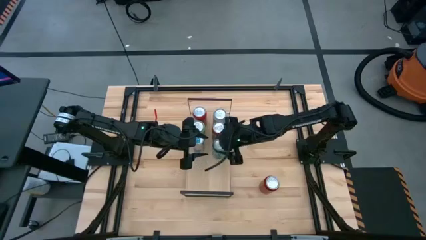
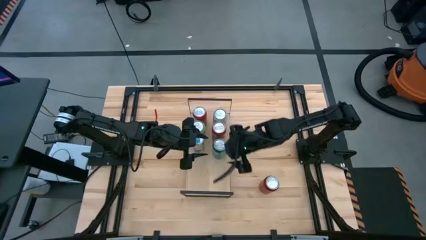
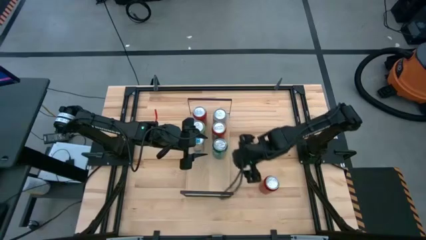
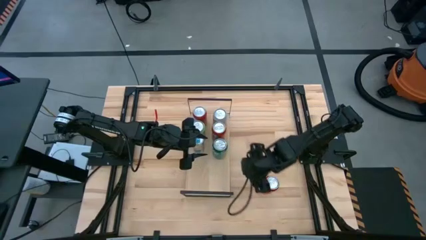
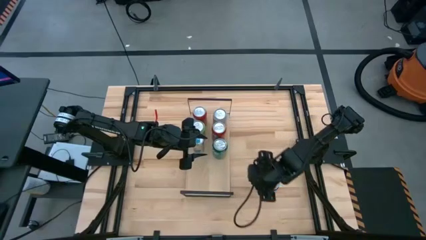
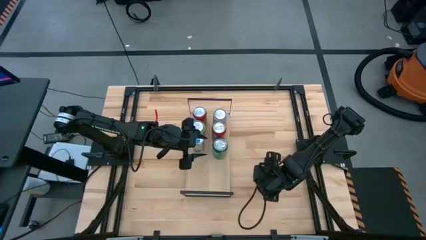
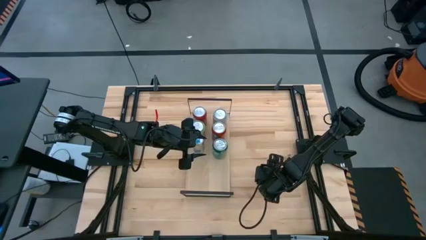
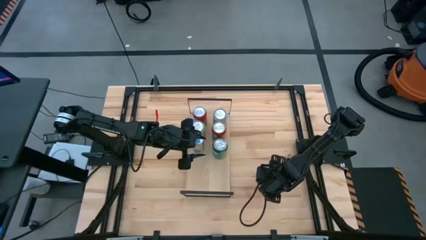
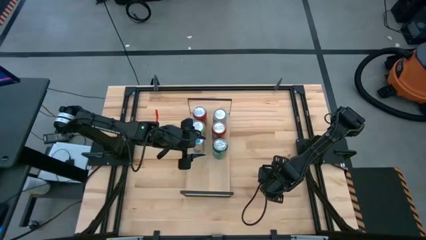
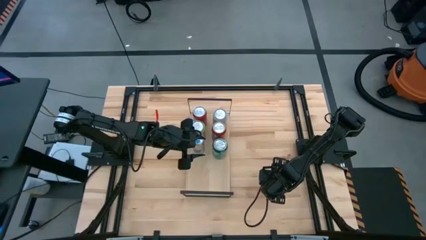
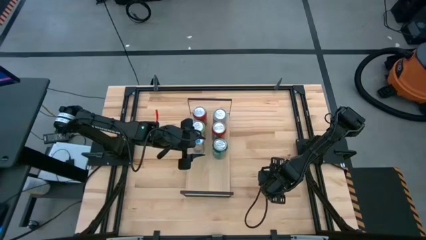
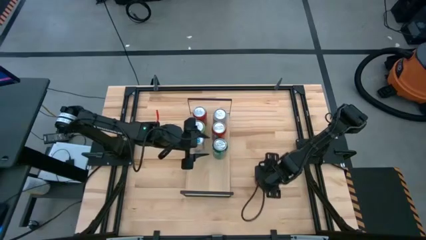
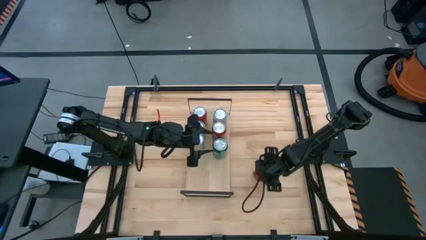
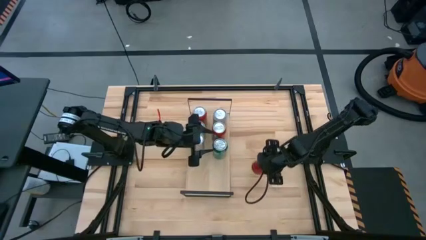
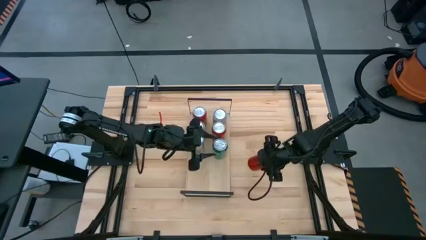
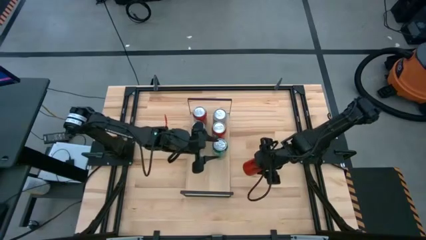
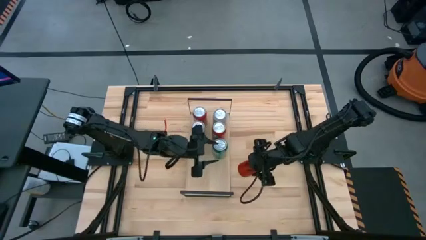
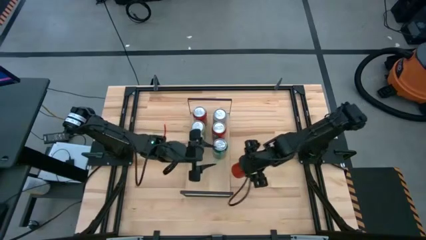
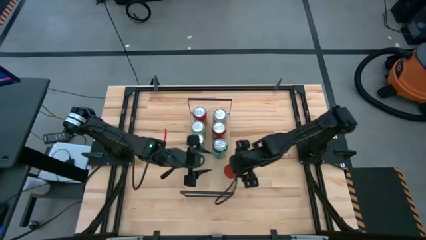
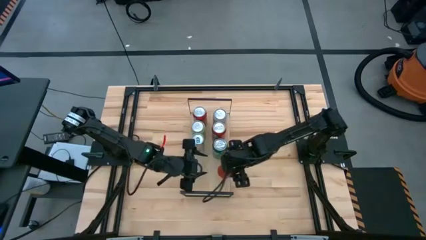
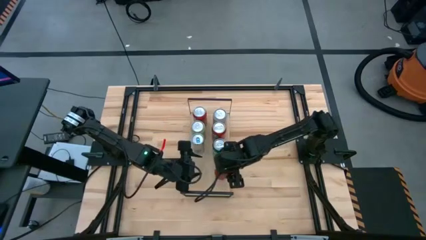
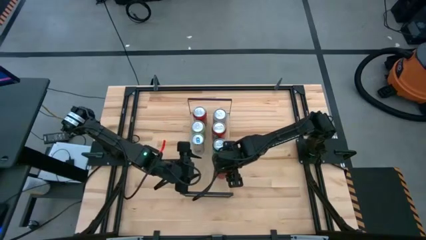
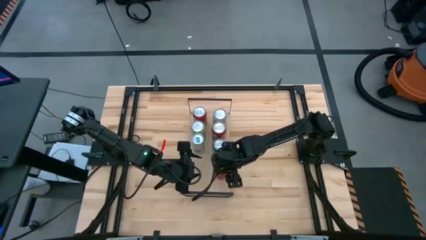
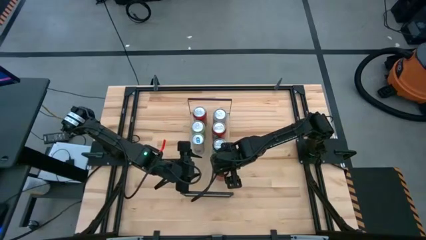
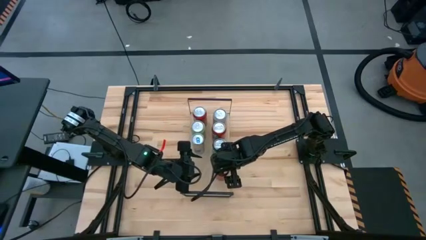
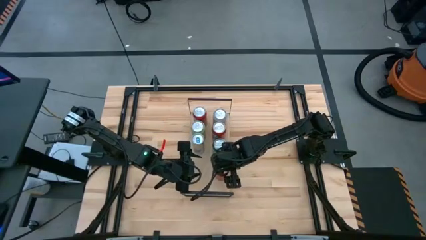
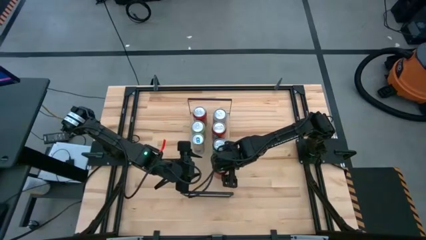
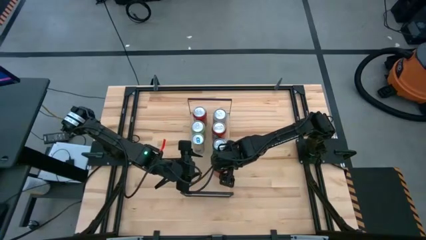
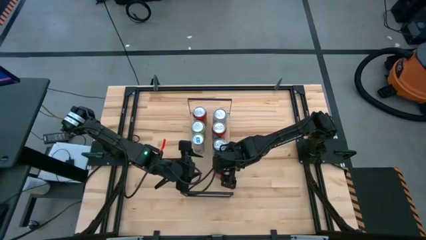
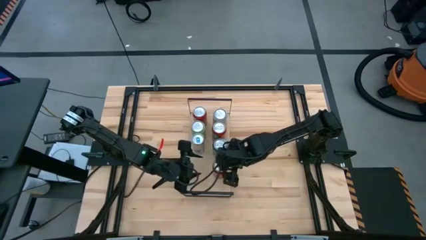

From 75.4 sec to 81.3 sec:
Task: Place canned beverage on shelf
Put the red black soda can on the shelf

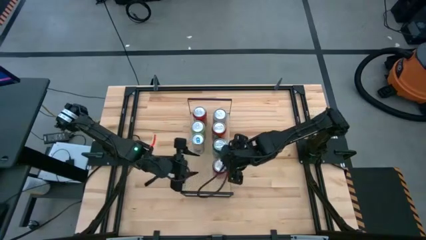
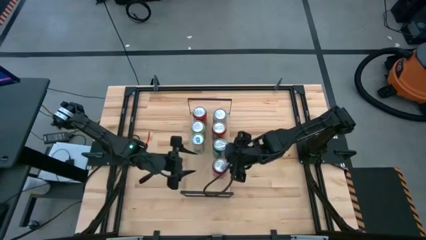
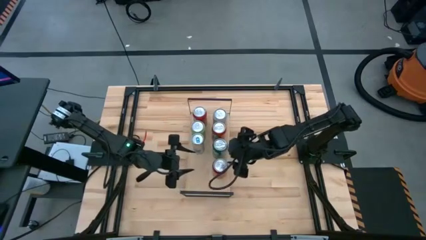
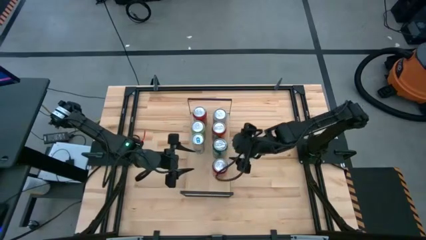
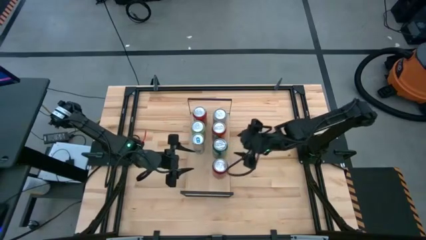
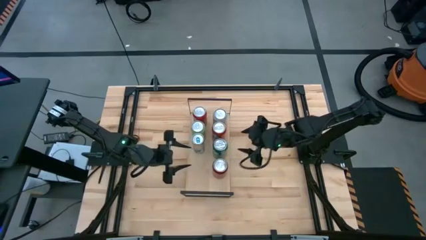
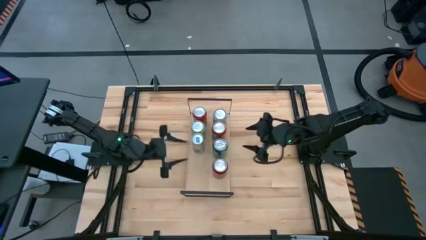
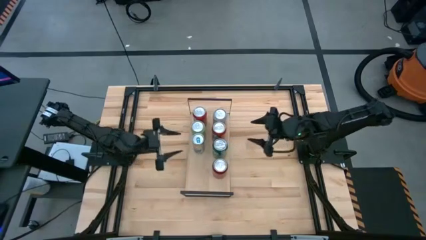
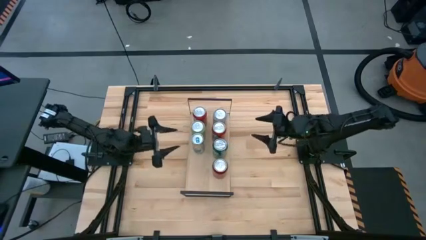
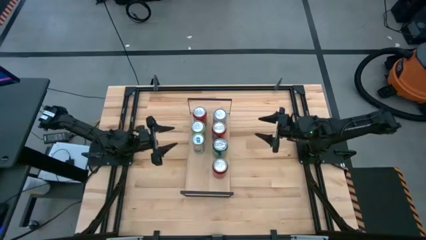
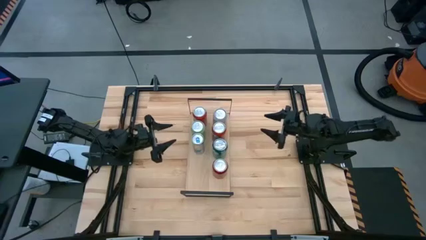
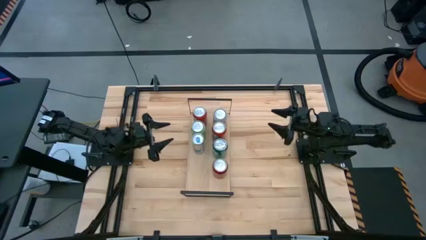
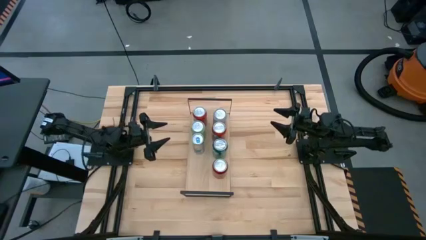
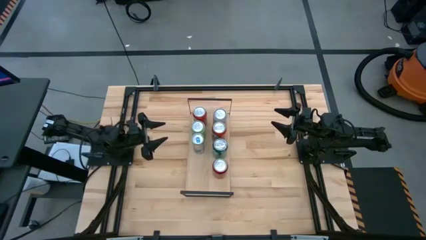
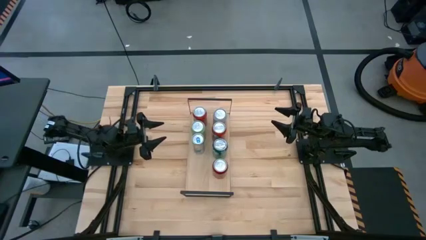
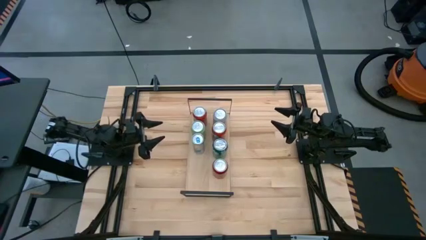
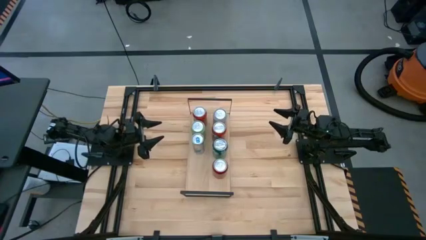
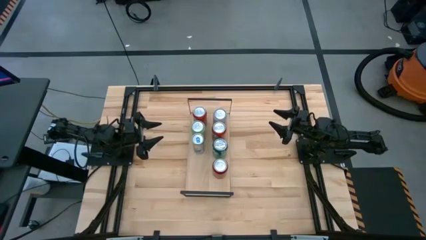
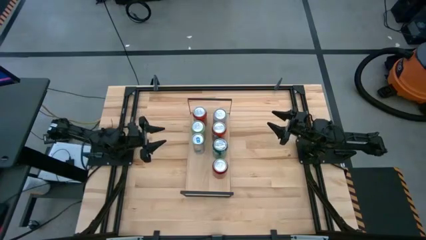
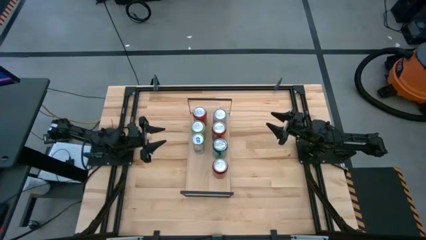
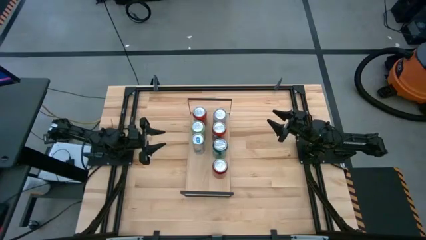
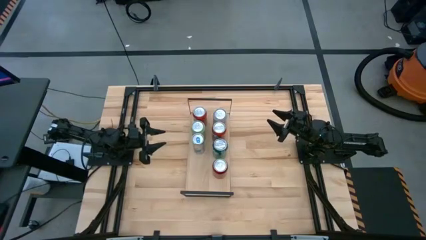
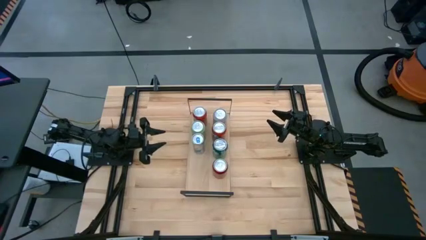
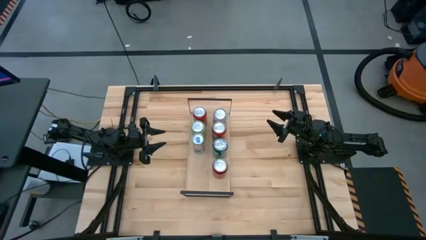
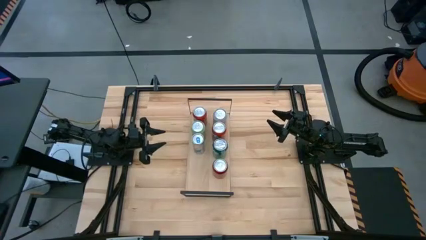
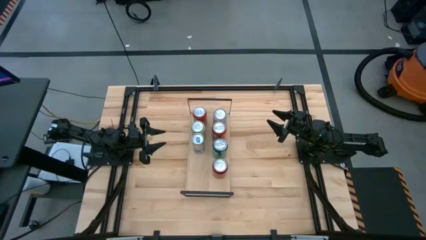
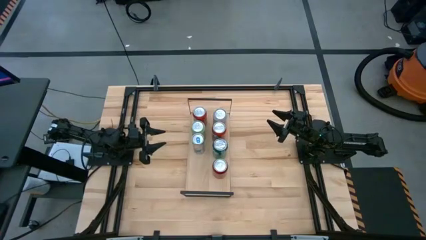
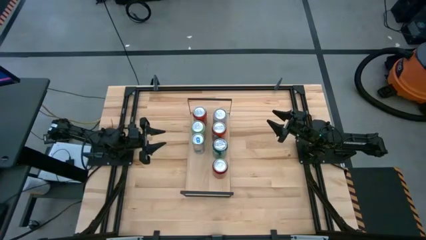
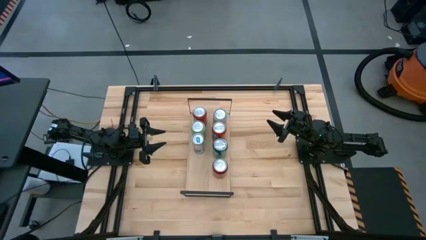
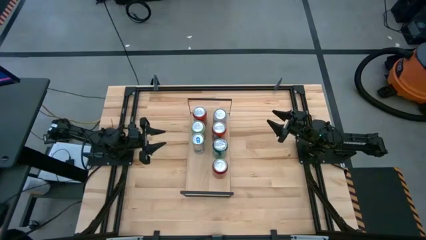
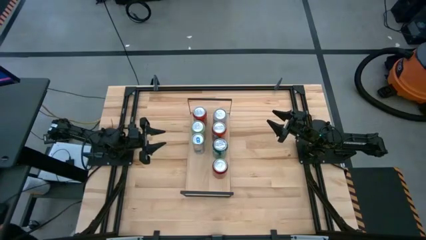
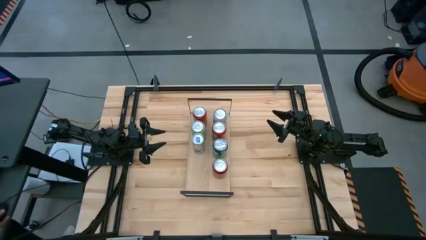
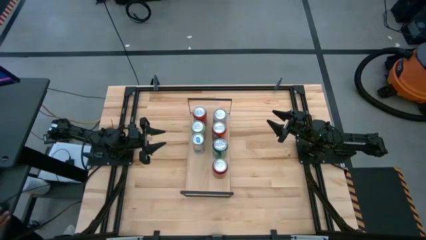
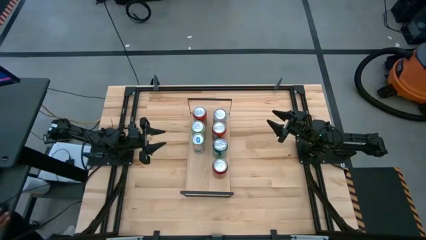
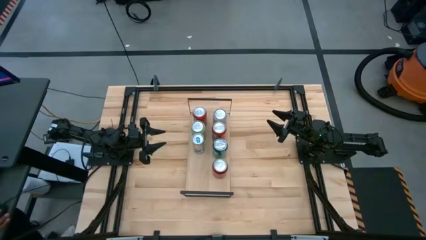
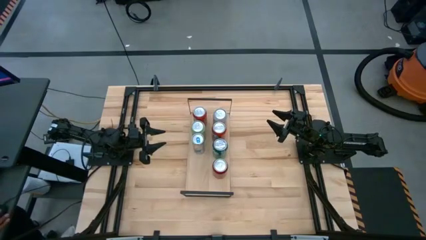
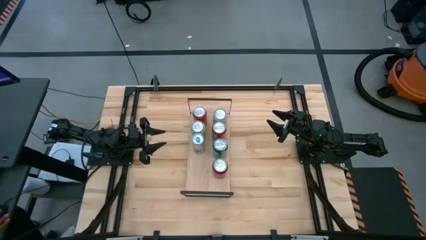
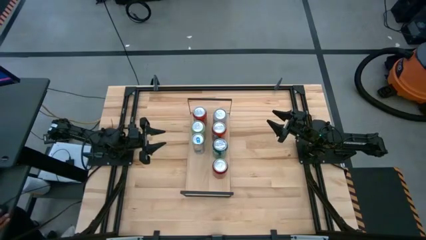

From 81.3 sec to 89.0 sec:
Return to Home Position
